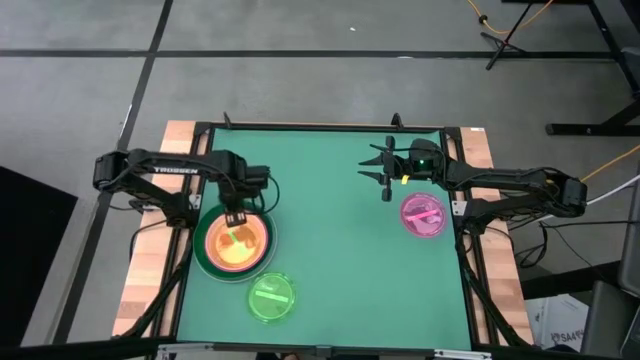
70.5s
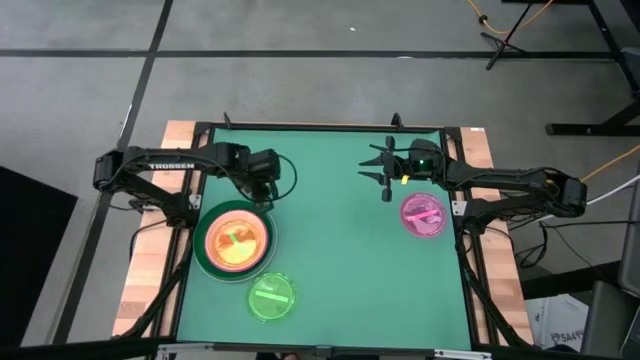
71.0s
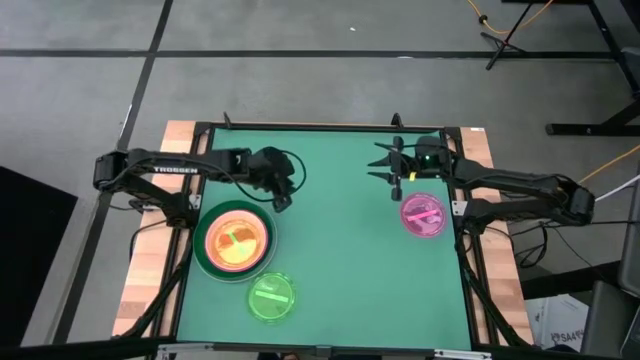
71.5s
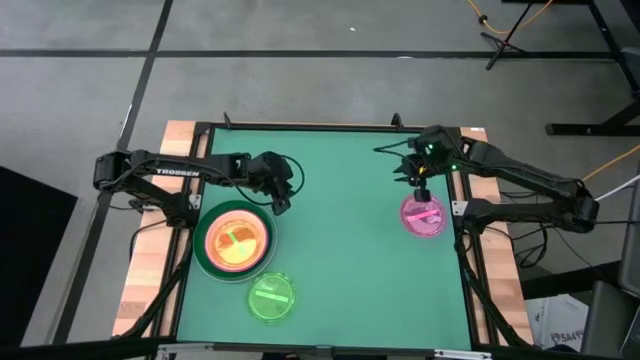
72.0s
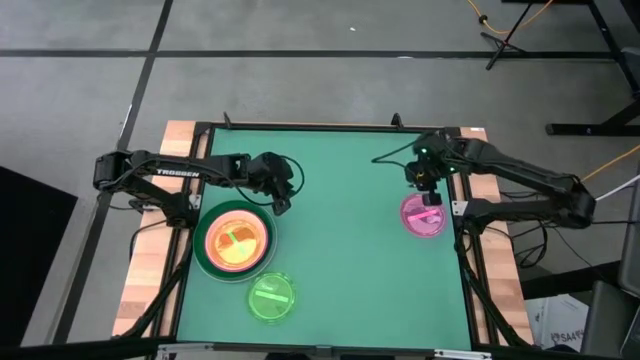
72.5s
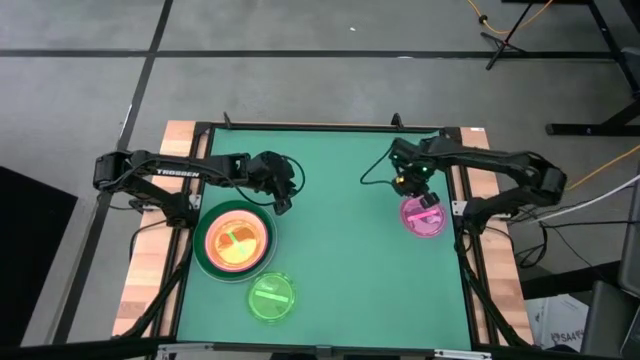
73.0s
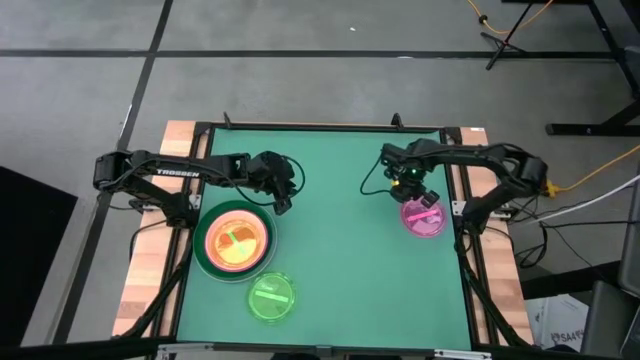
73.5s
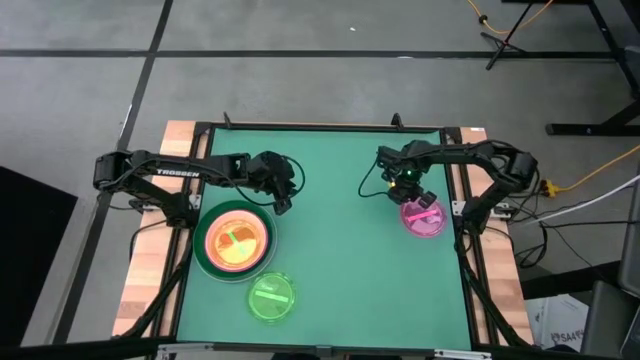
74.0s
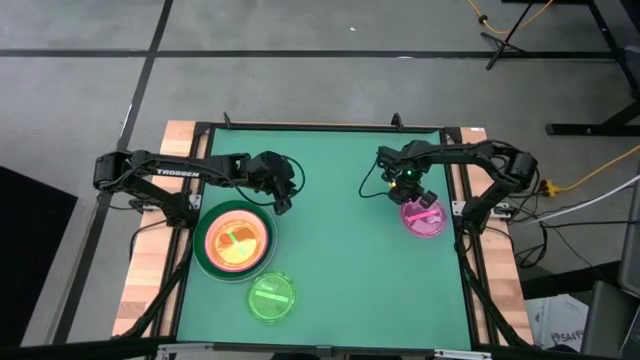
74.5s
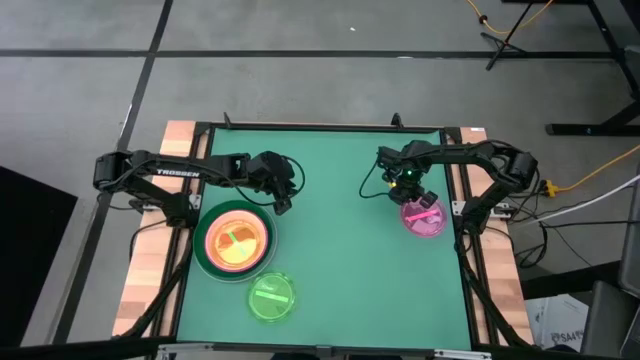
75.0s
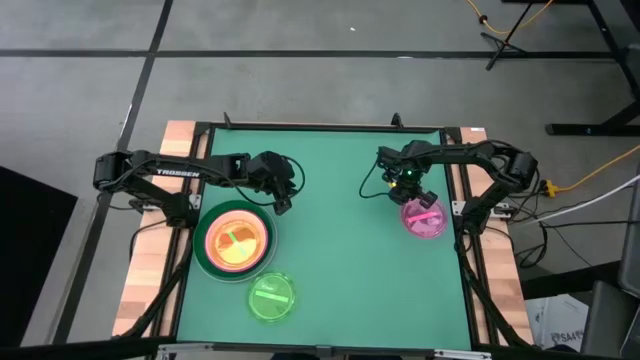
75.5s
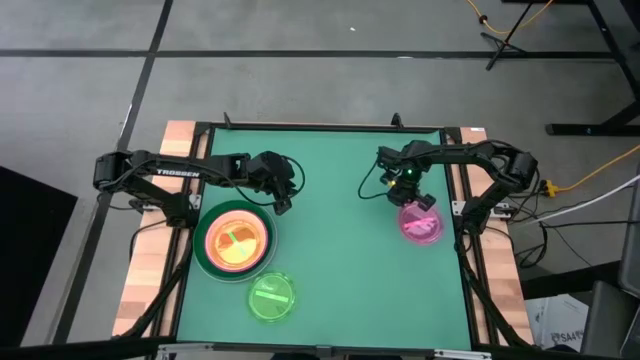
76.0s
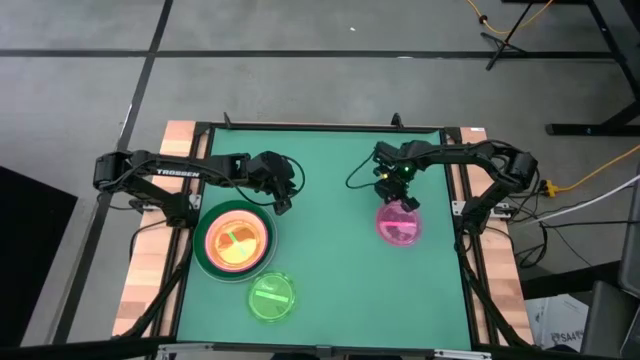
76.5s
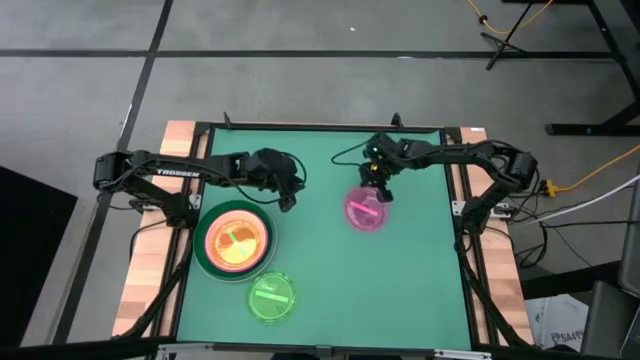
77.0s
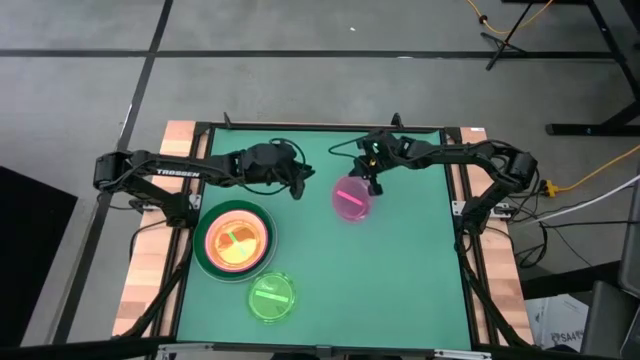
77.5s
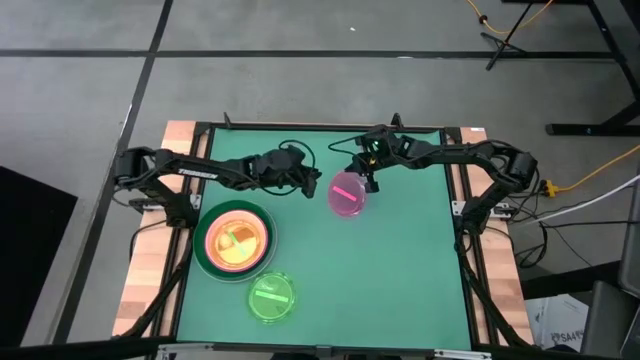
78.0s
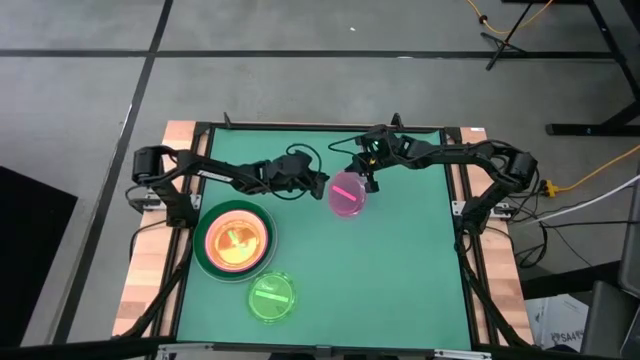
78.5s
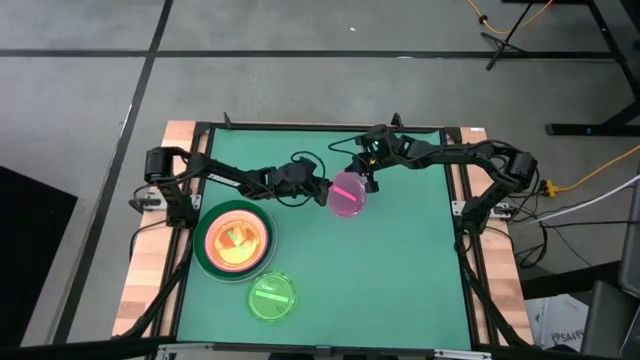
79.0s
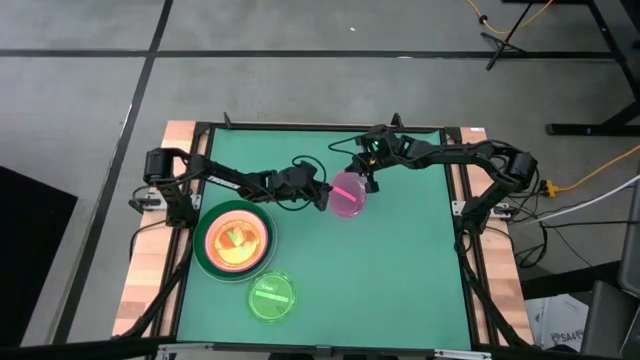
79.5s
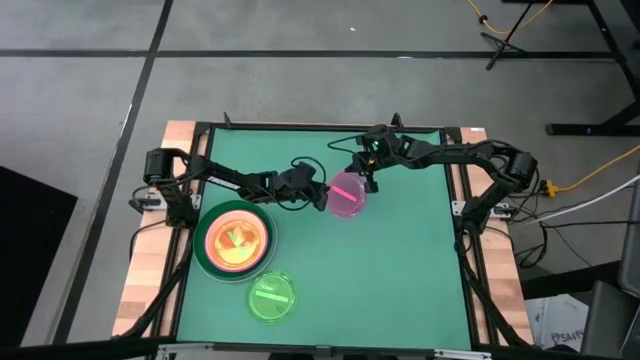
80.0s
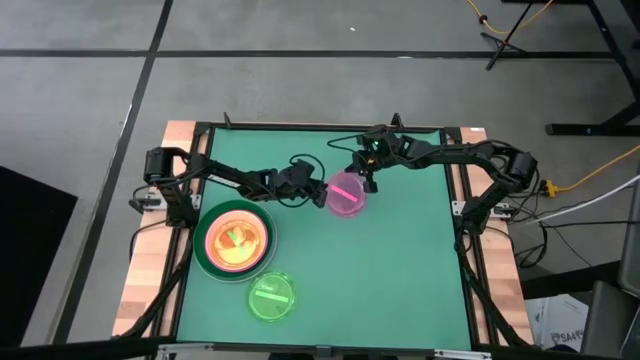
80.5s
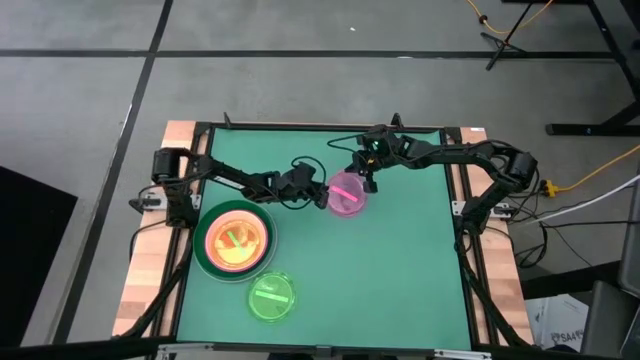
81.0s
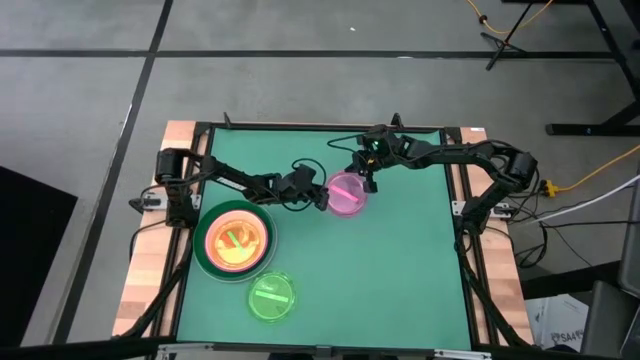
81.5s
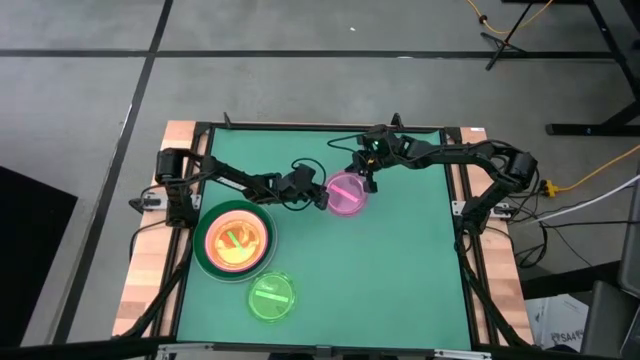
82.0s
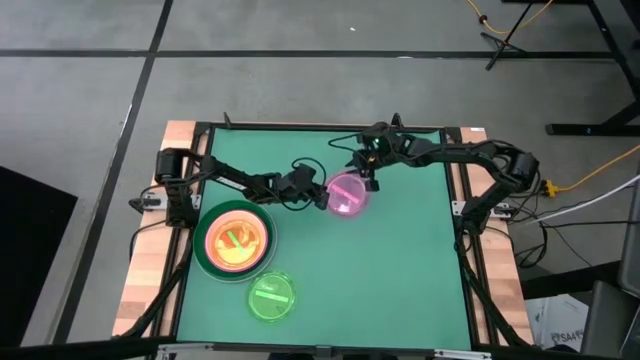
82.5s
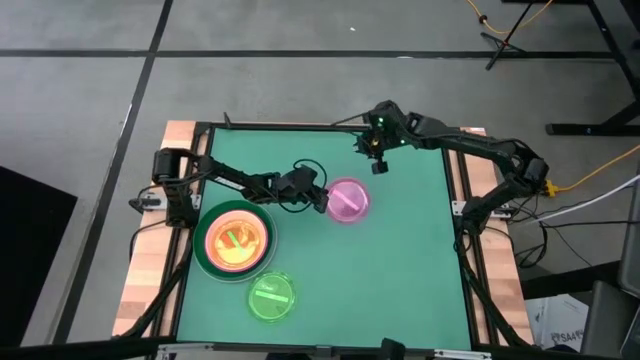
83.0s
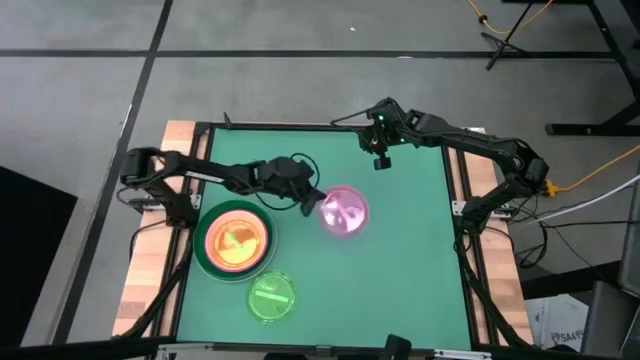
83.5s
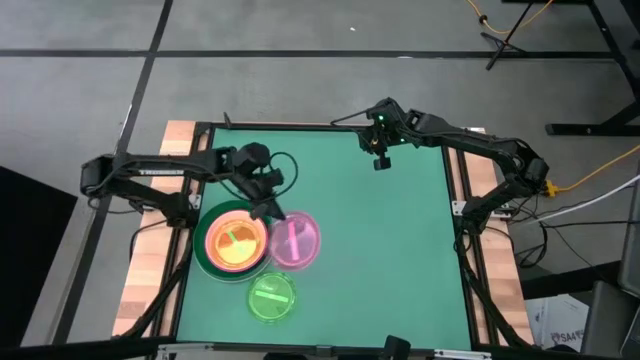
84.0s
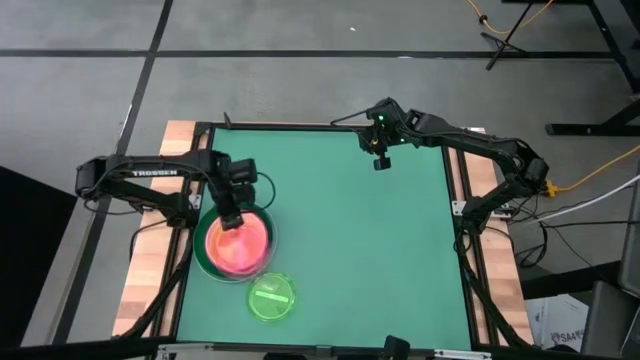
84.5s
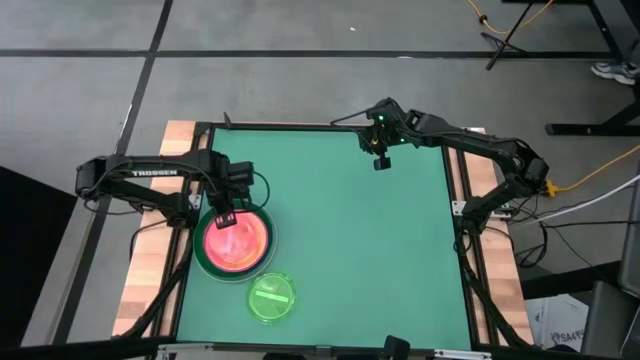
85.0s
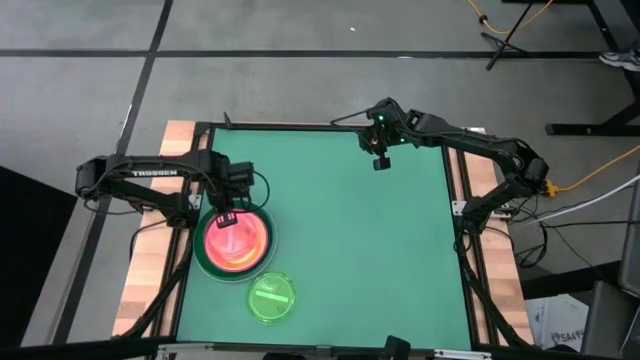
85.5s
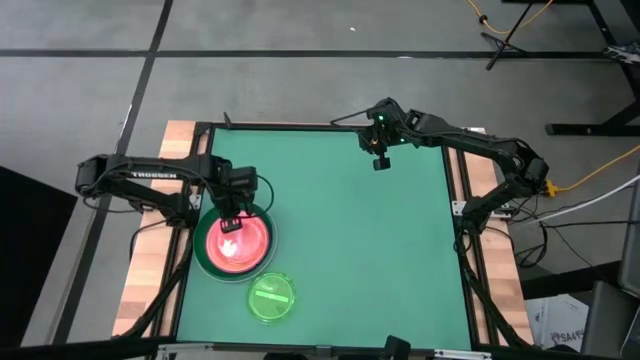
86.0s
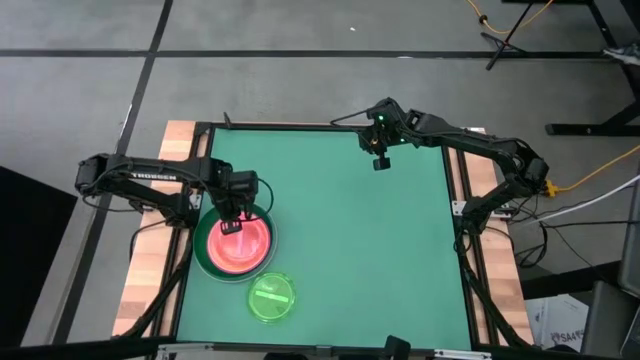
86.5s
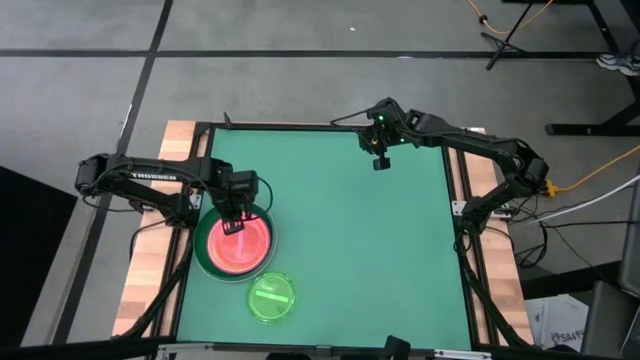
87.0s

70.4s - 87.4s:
Task: Stack plastic plates
Stack the light pink plate on top of the light green plate

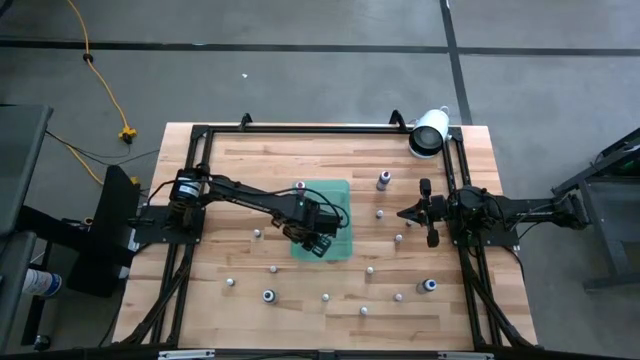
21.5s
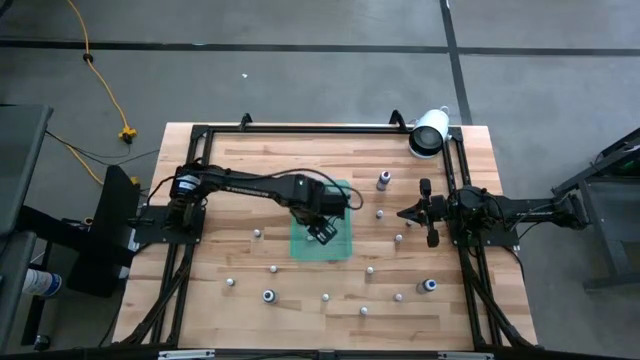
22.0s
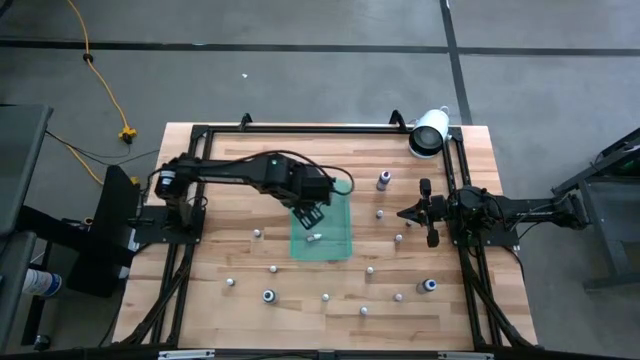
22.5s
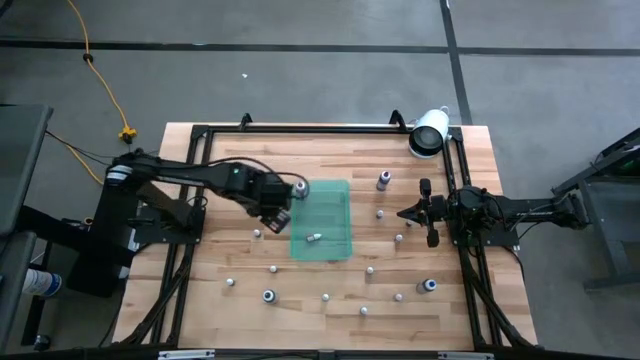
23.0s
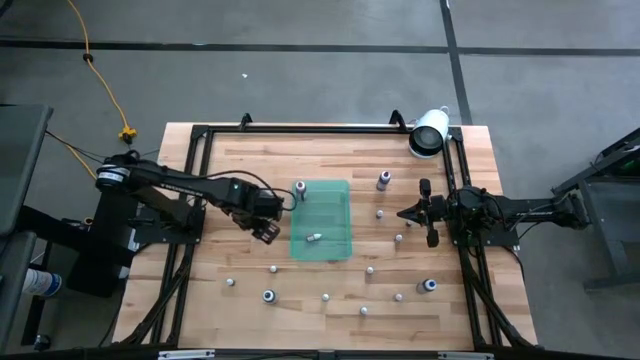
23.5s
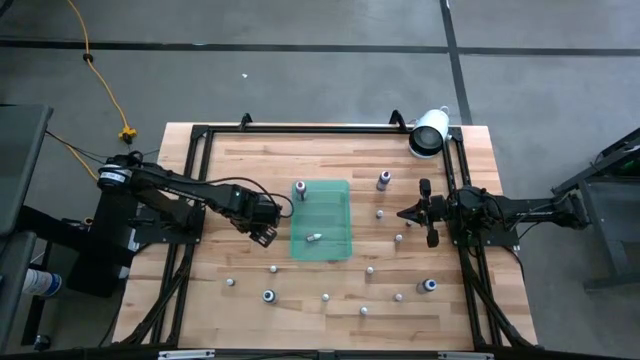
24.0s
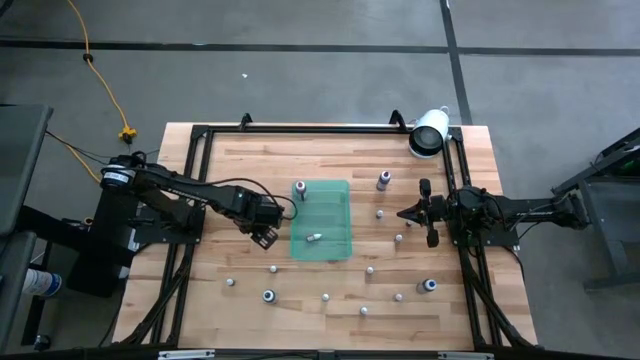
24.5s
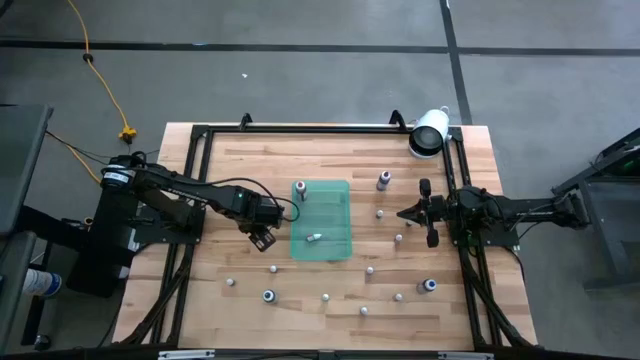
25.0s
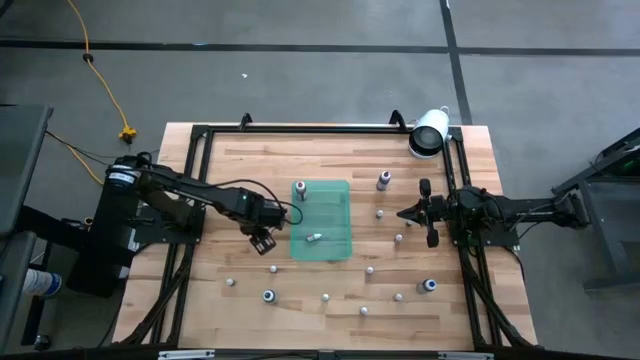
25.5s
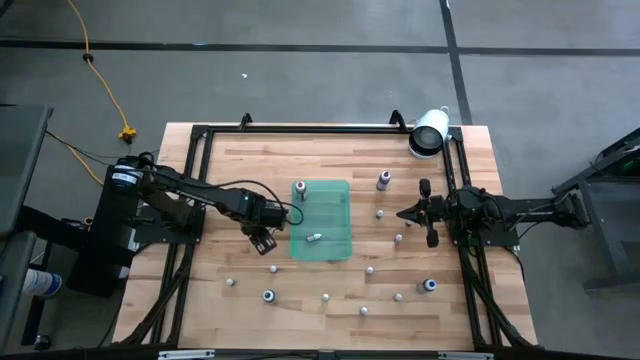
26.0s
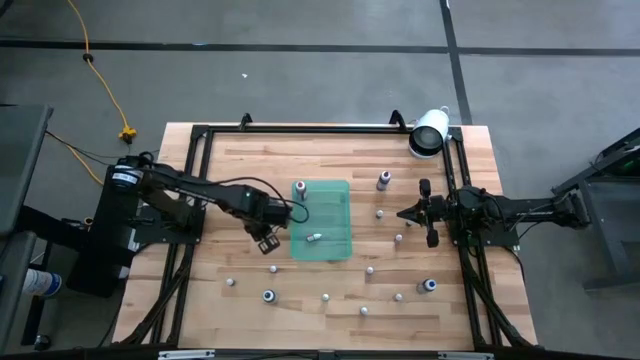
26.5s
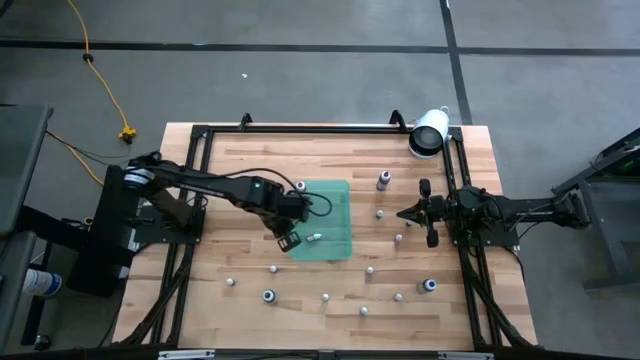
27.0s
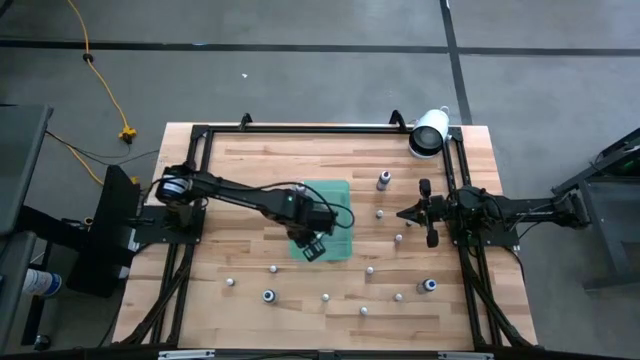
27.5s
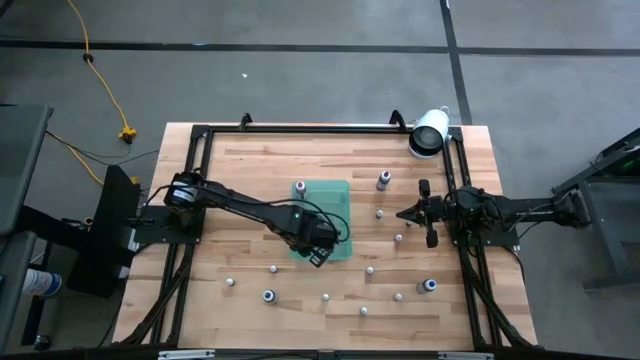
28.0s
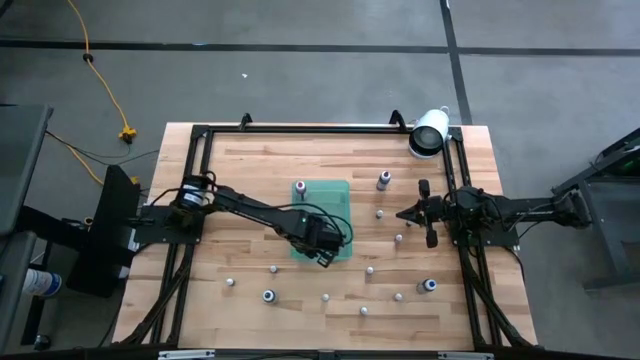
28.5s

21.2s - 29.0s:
Task: Pick & Place food coloring
Put the small brown food coloring bottle into the green bin
